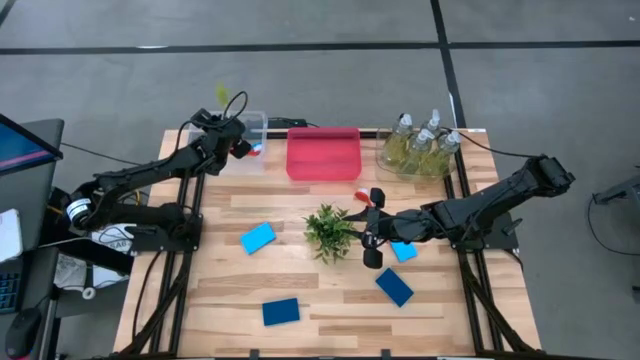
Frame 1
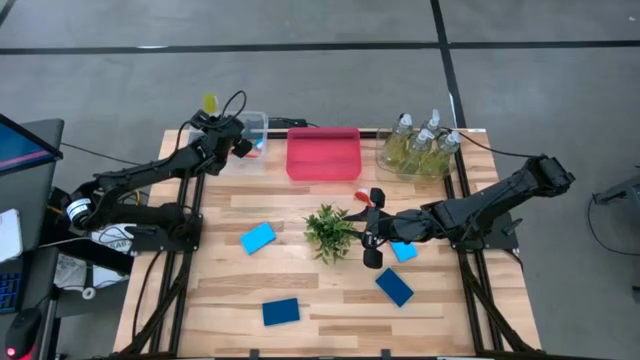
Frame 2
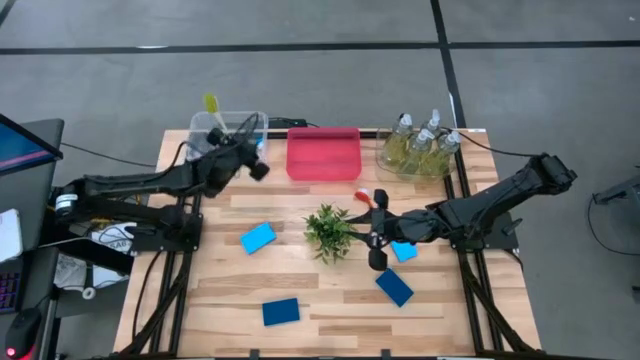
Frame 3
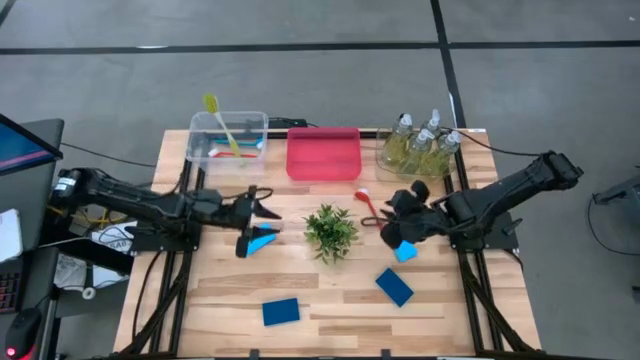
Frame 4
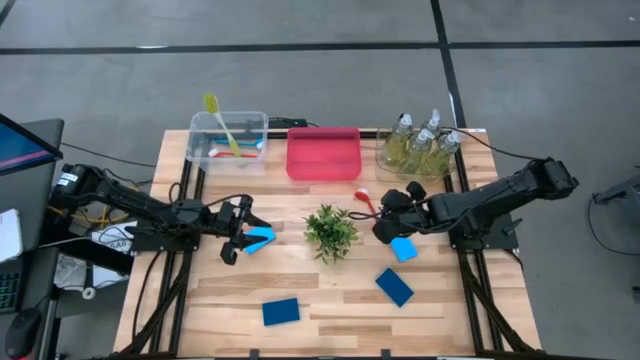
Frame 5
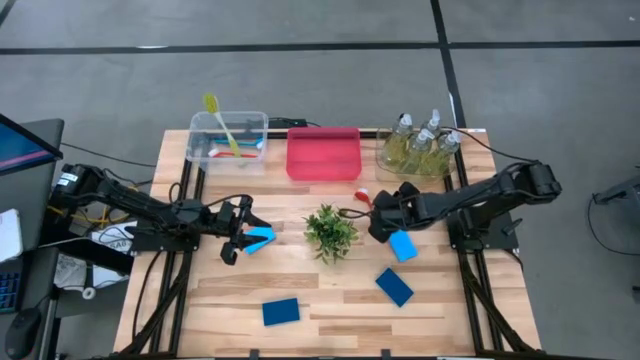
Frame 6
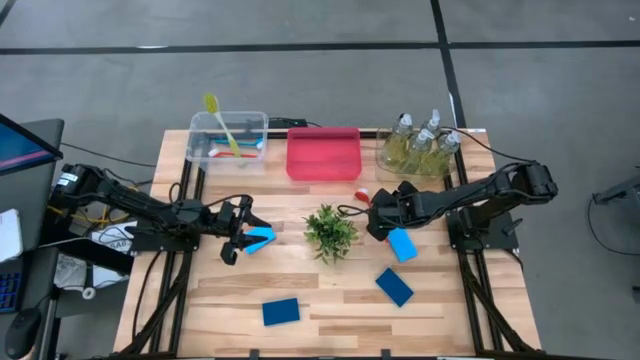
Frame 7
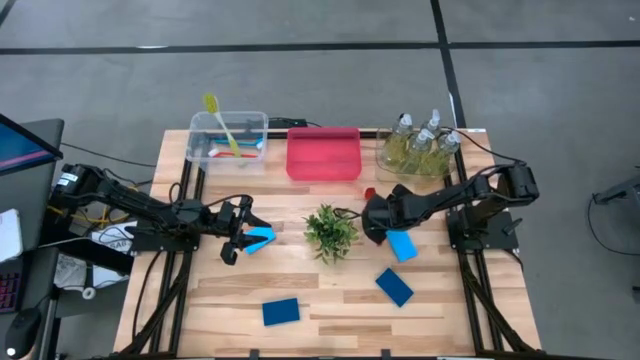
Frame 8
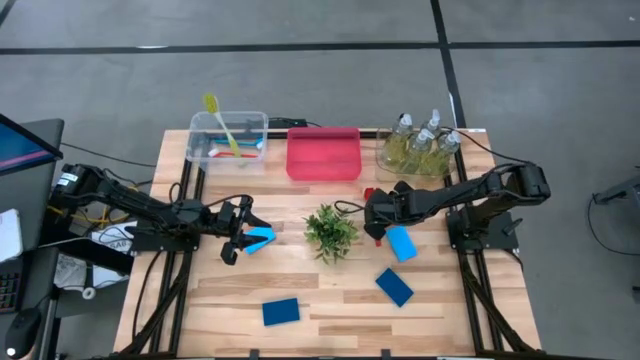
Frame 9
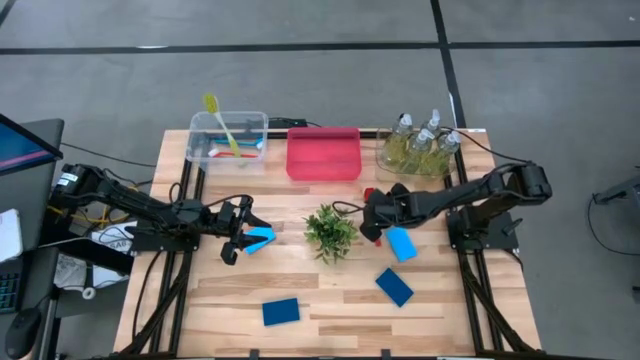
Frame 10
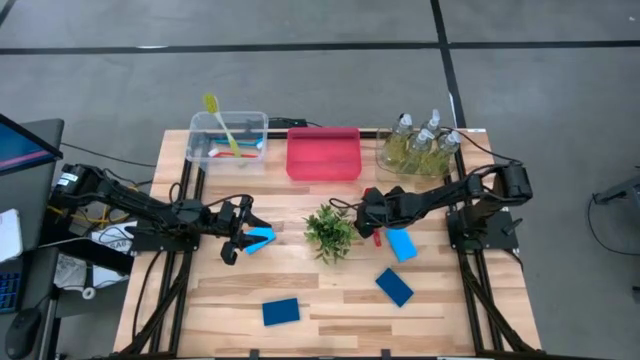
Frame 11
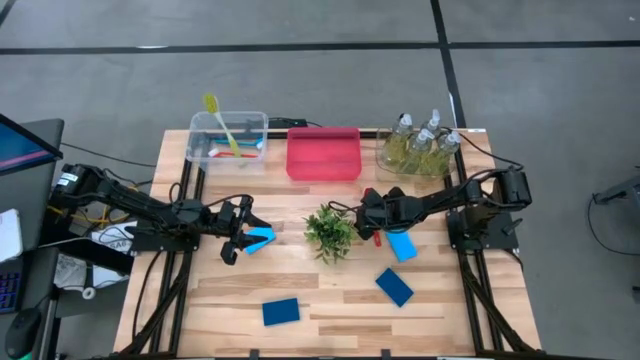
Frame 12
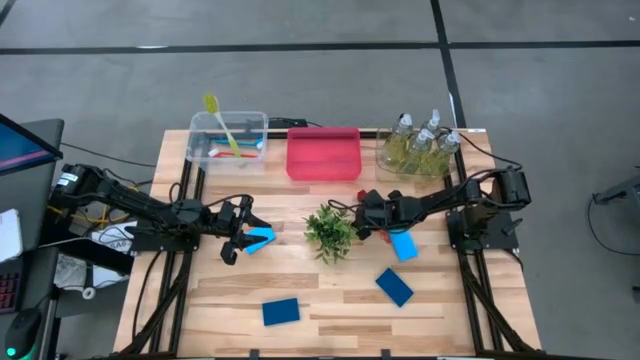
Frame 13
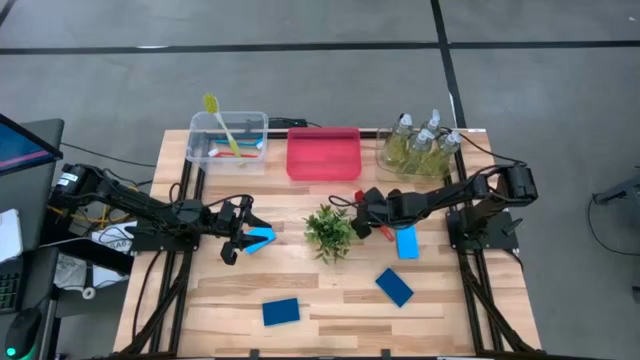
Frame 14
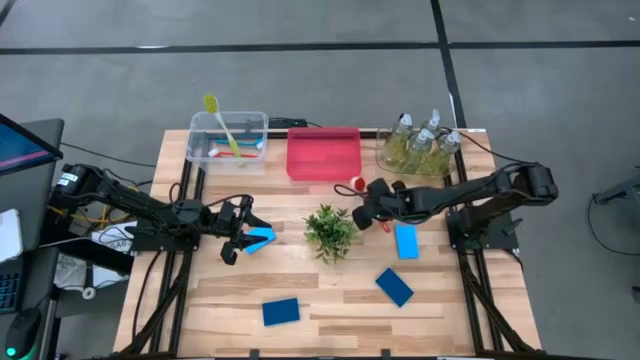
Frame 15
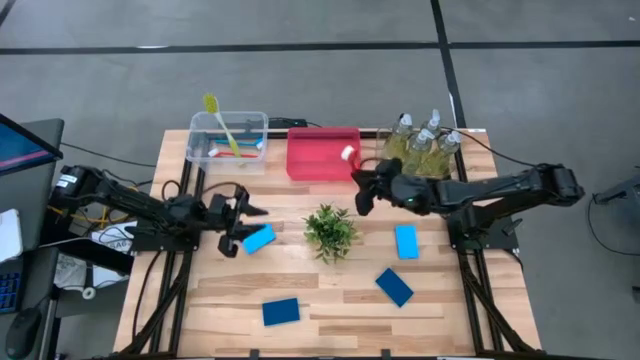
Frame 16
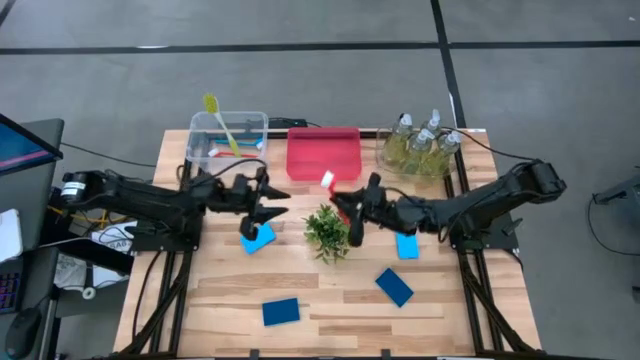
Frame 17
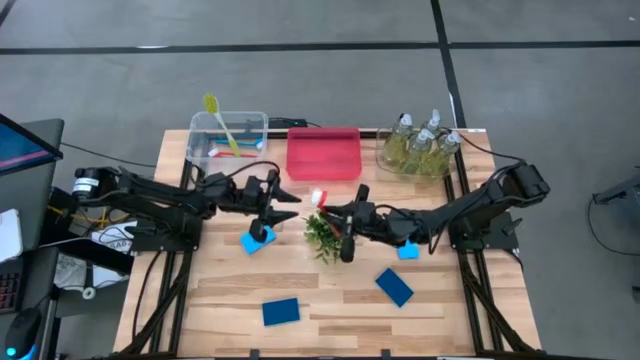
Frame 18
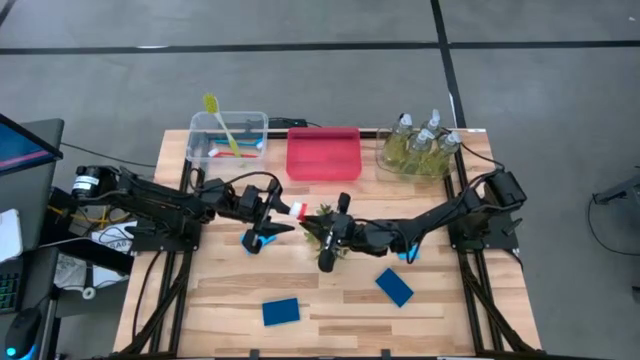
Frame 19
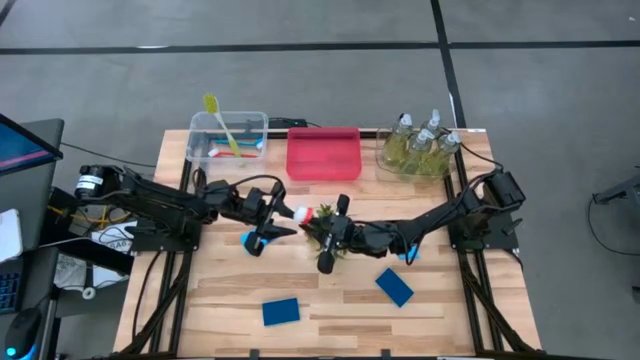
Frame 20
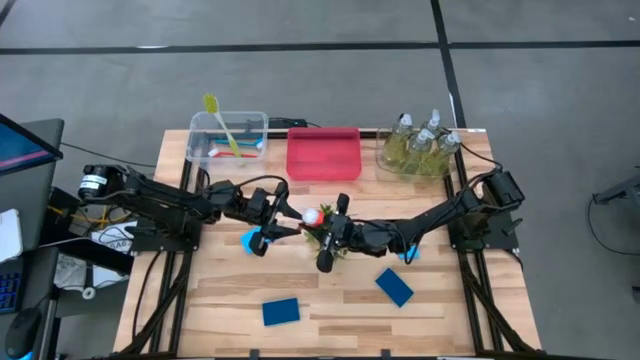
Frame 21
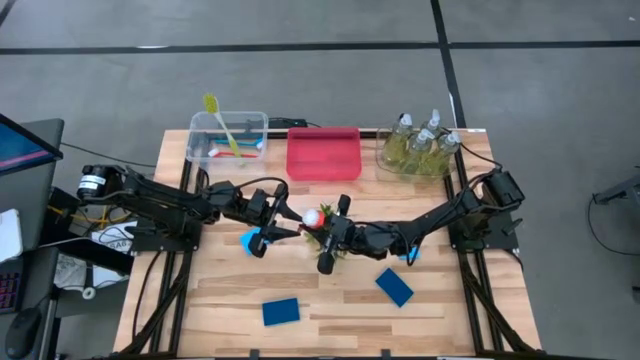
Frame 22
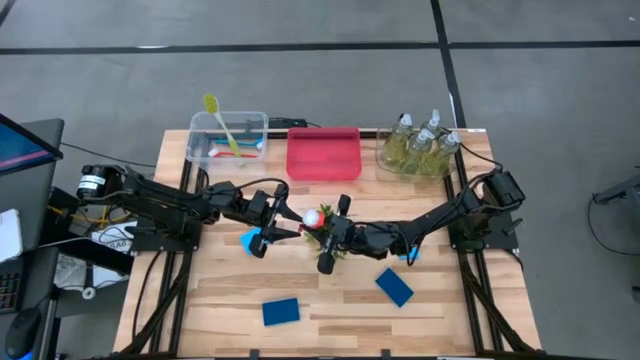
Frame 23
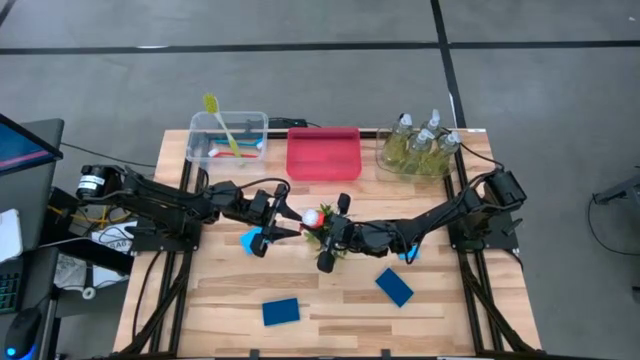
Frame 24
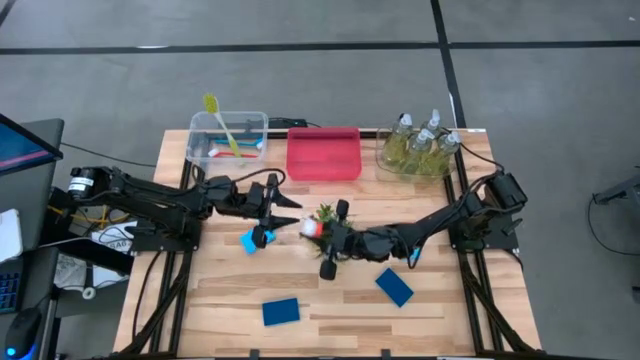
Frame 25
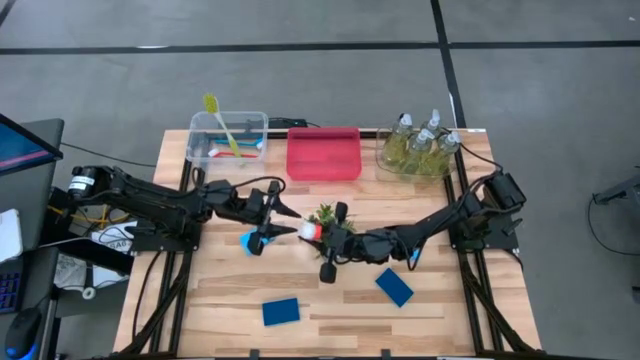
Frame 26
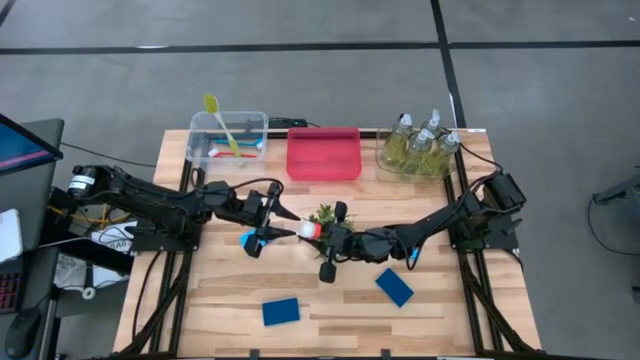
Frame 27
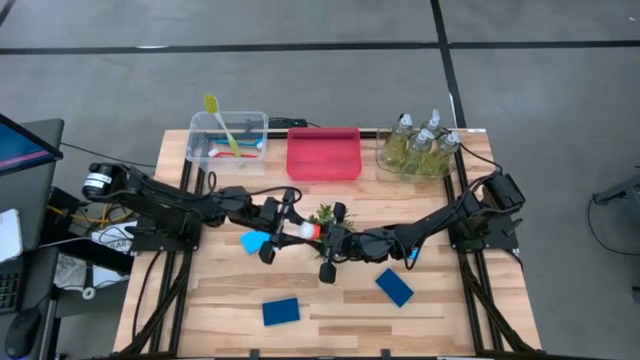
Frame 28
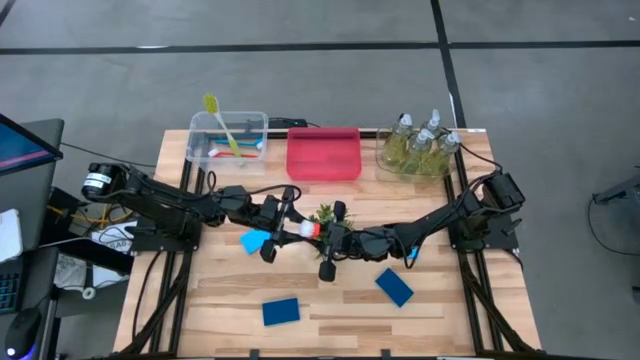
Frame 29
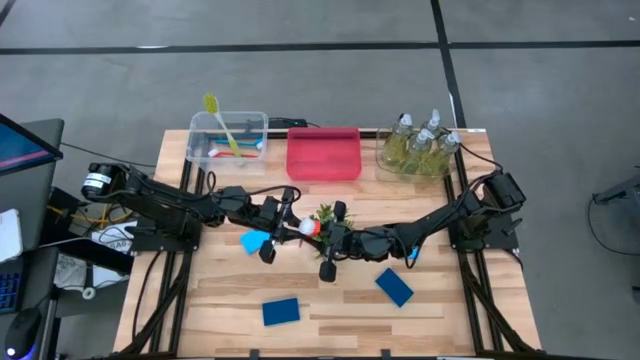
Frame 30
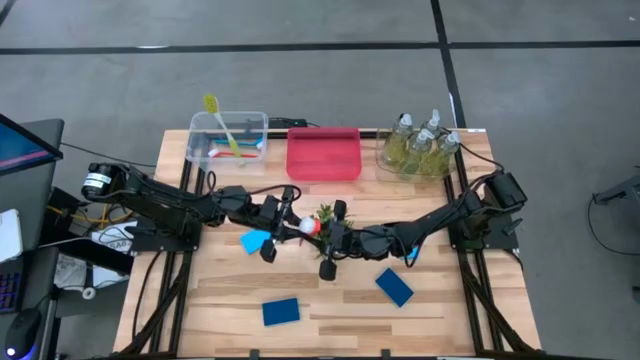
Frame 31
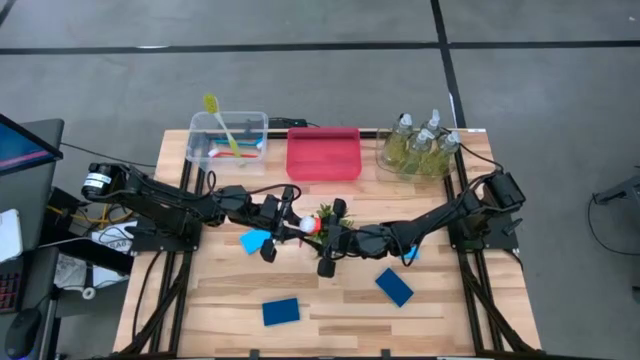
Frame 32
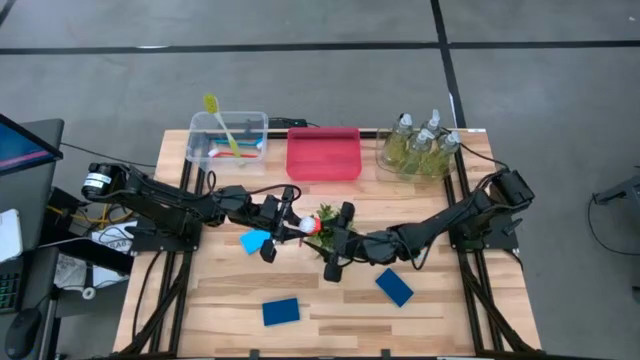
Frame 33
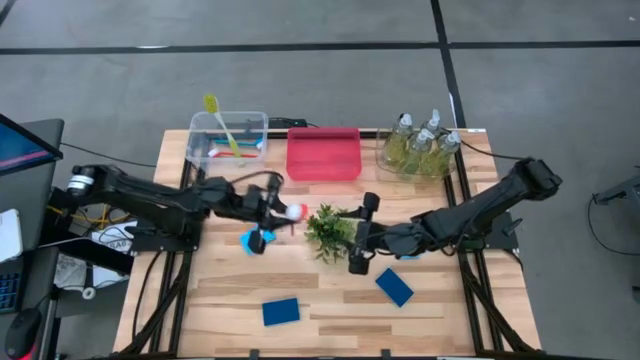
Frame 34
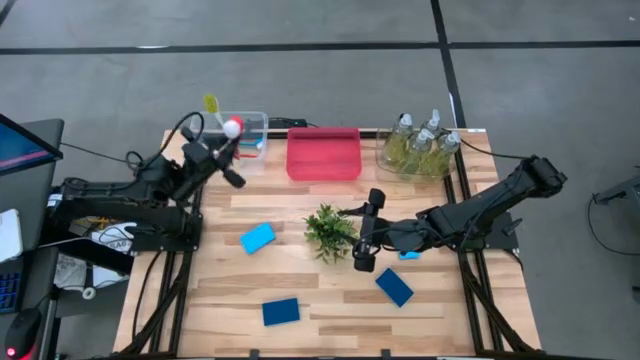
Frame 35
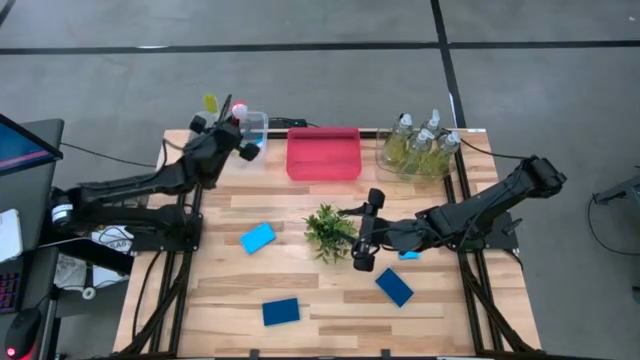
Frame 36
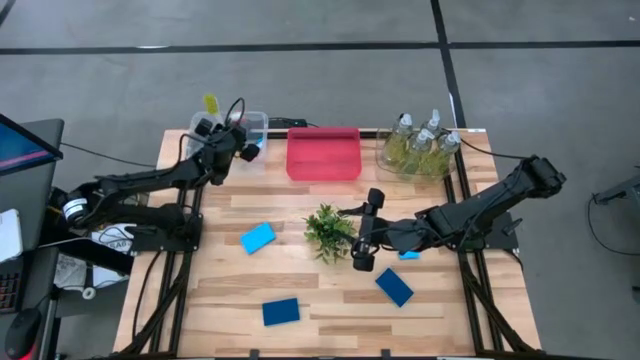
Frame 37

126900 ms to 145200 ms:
Task: Pick & Place Kitchen Sink Supplies
Put the red dish brush into the left transparent bin

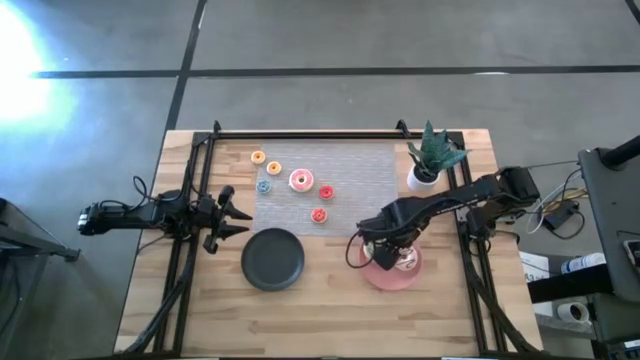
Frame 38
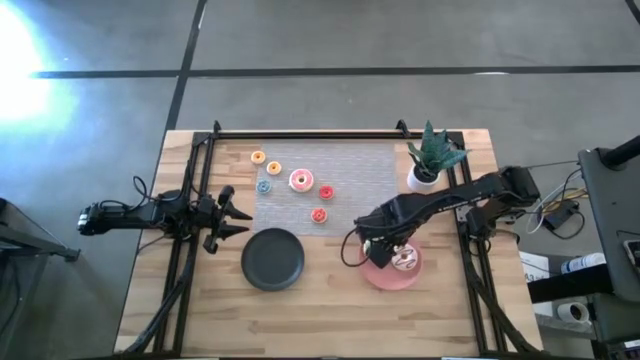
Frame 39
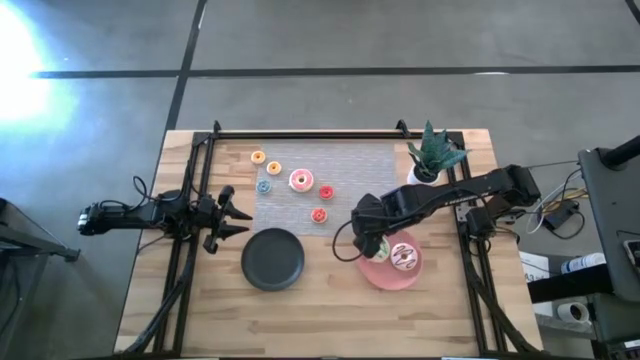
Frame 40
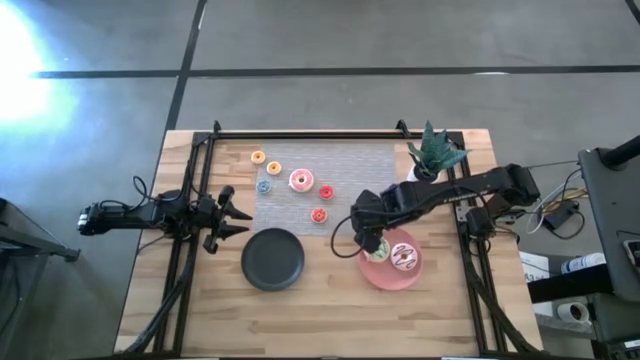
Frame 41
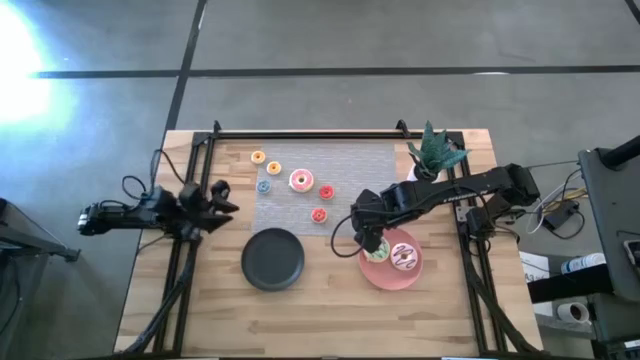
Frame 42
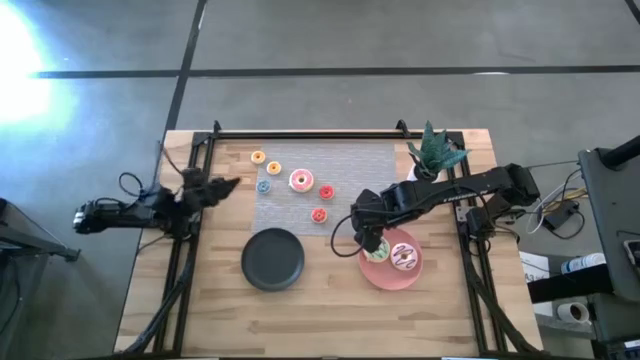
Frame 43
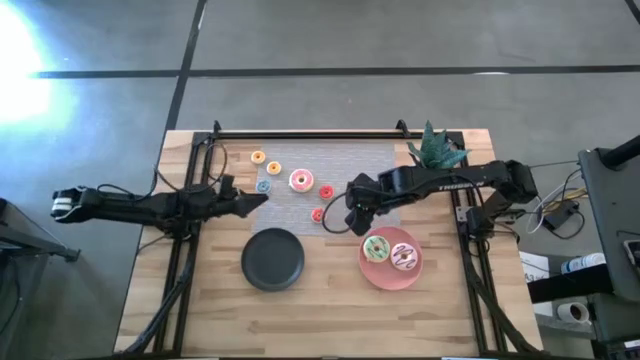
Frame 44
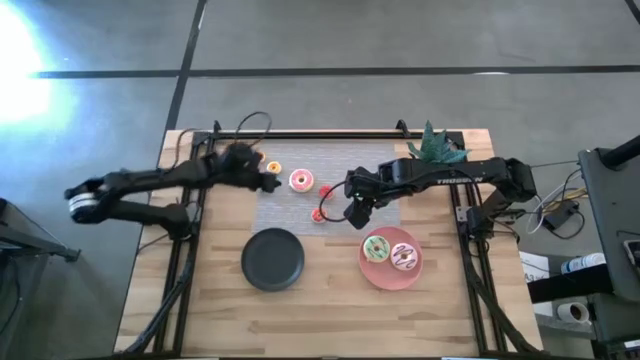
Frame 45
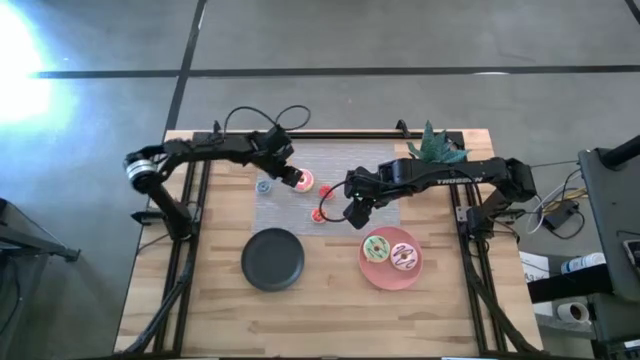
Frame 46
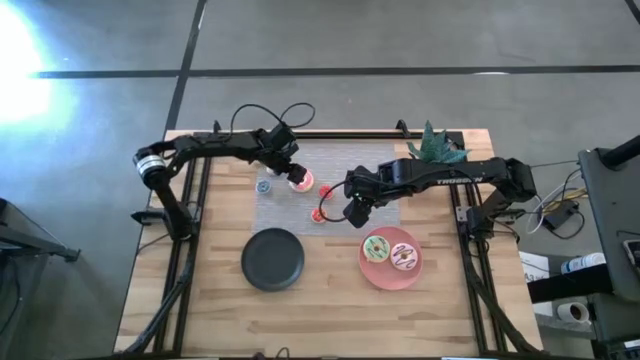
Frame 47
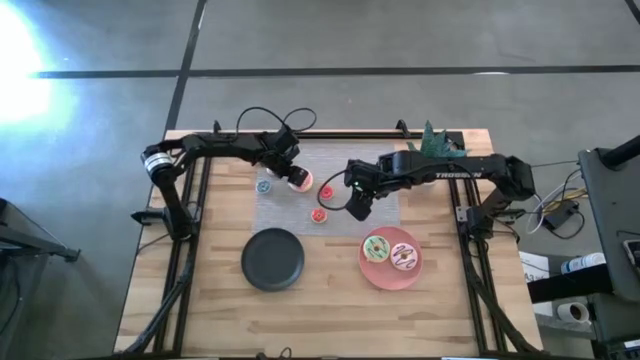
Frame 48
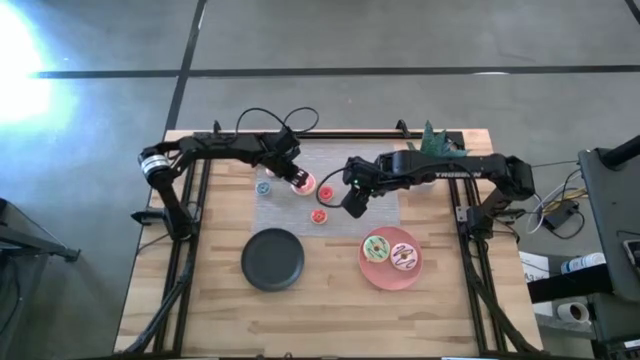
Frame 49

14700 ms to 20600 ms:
Task: Pick & Place donuts
Put the large pink donut on the pink plate
